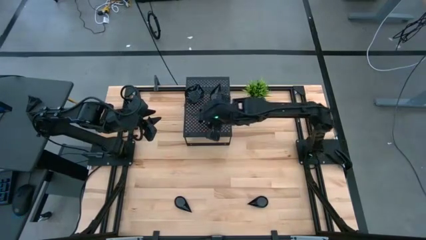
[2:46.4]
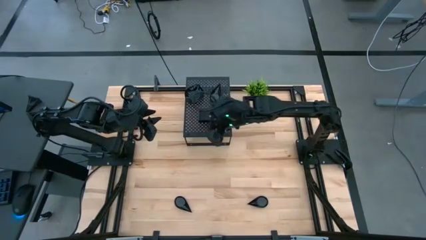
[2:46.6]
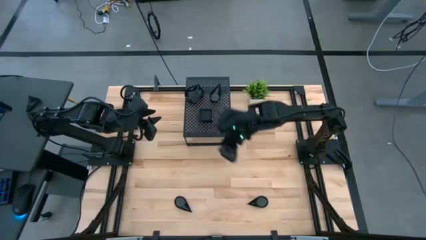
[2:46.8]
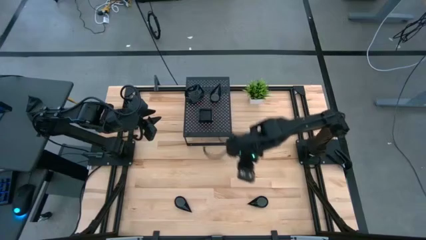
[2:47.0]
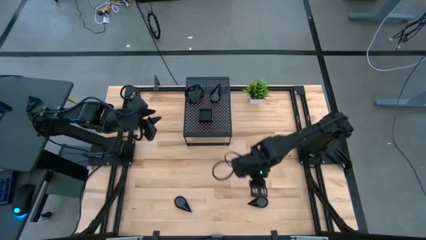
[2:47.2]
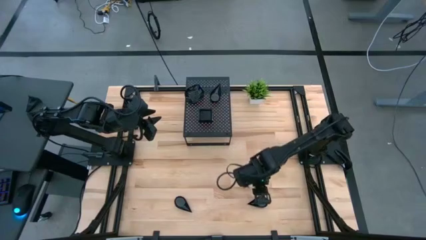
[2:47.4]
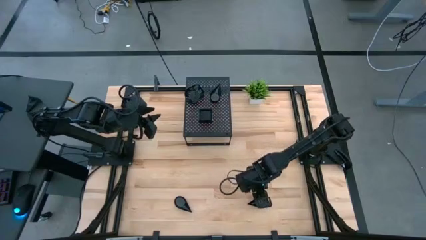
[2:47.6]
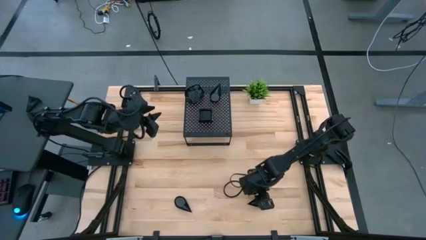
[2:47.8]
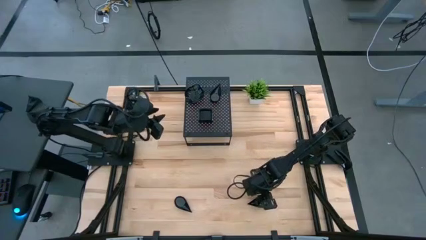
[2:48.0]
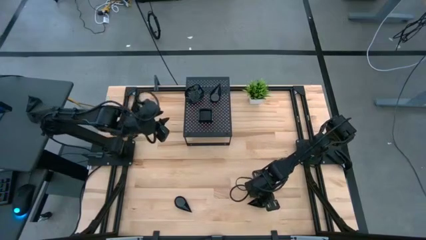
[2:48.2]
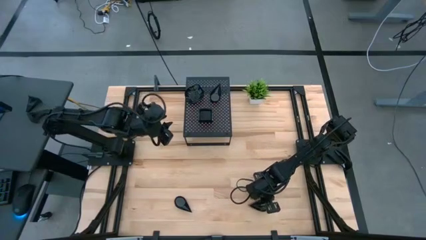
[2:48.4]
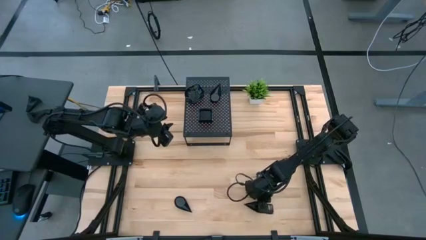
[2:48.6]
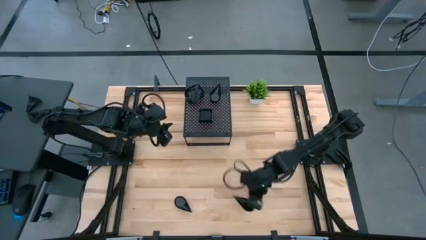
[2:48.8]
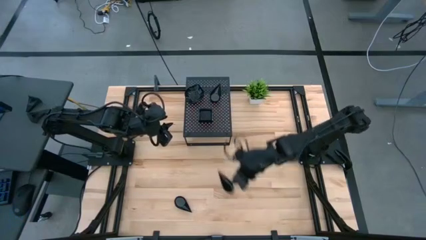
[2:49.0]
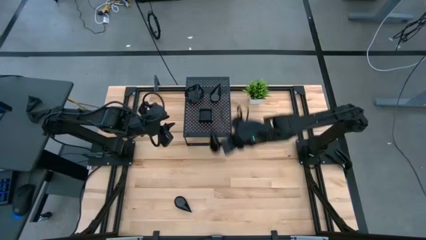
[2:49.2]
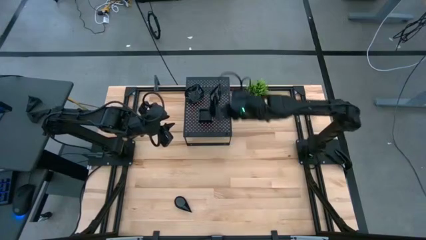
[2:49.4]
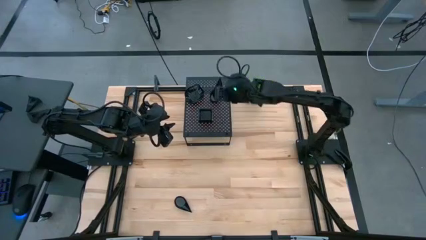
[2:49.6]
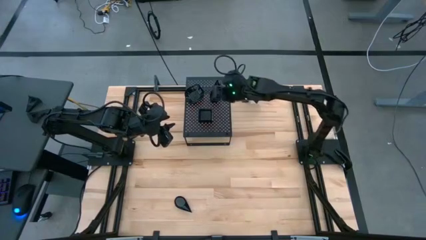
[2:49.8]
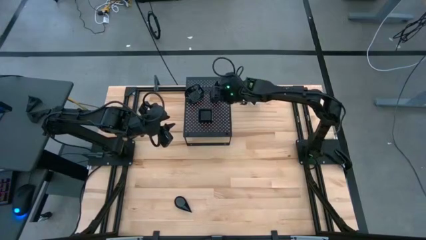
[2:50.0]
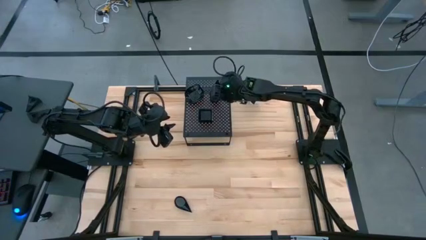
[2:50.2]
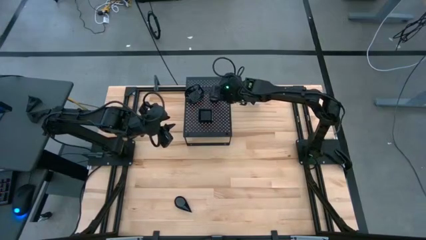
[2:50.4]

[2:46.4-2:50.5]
Task: Pick & Place Mini shaped plates
Stack the drop shaped plate on top of the drop shaped plates on the shelf

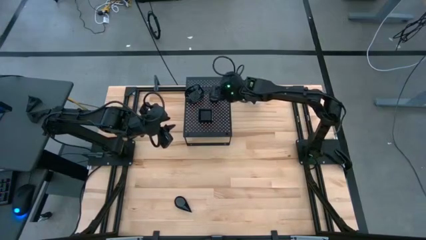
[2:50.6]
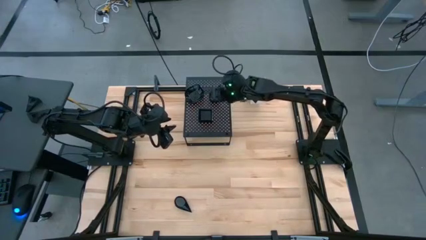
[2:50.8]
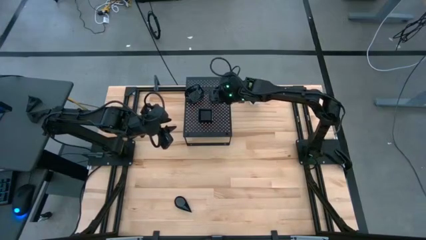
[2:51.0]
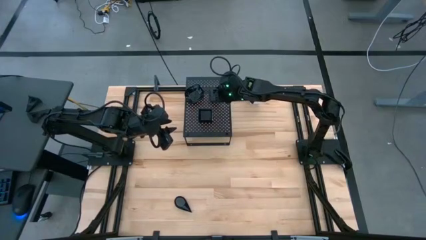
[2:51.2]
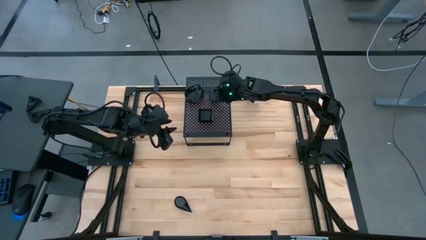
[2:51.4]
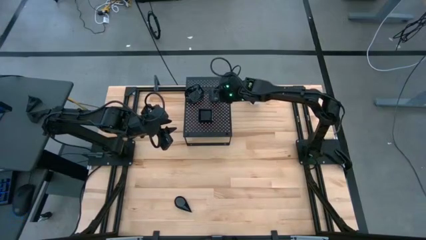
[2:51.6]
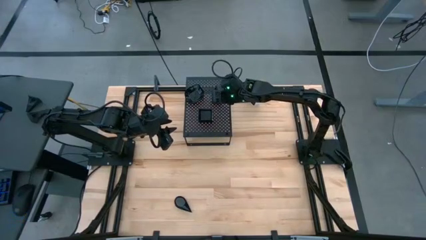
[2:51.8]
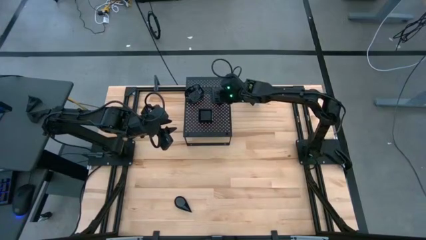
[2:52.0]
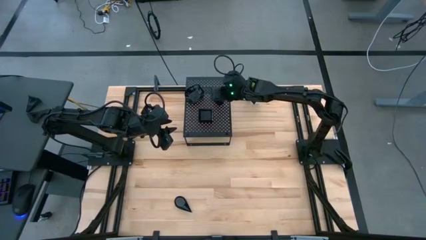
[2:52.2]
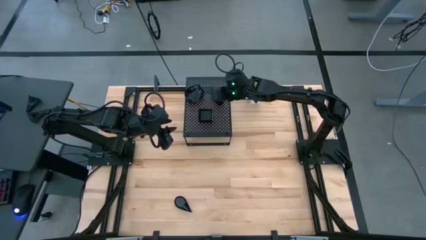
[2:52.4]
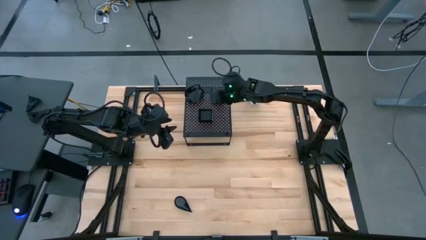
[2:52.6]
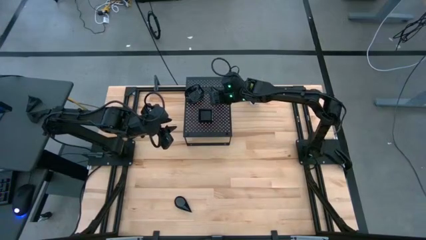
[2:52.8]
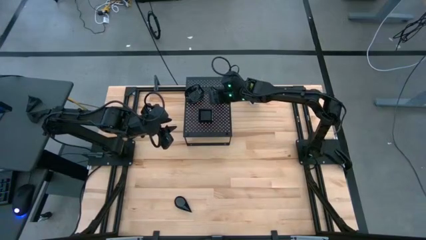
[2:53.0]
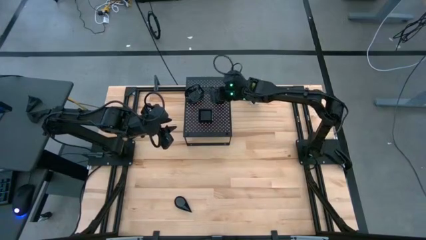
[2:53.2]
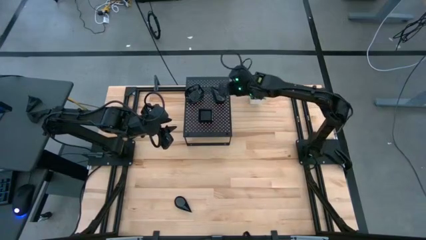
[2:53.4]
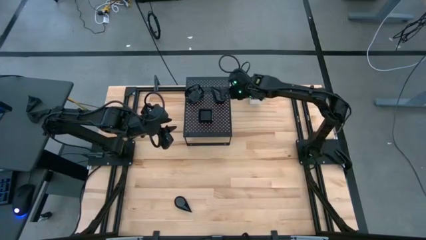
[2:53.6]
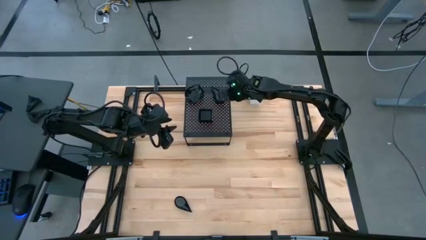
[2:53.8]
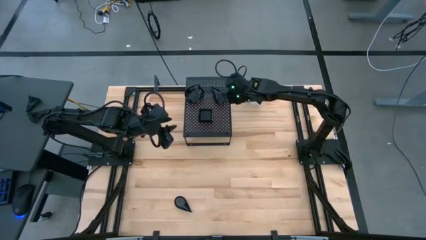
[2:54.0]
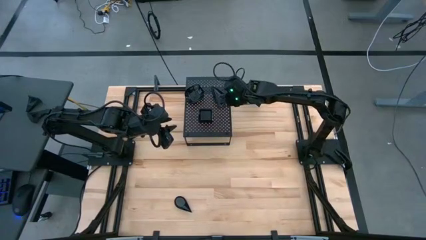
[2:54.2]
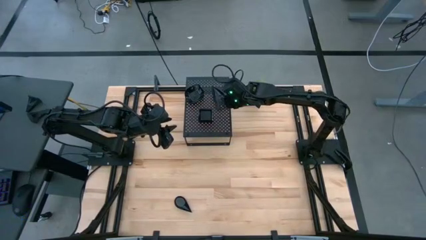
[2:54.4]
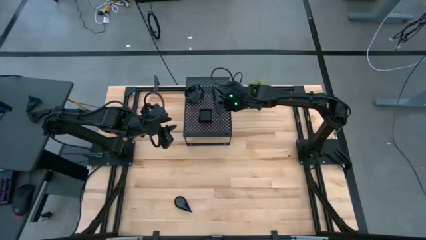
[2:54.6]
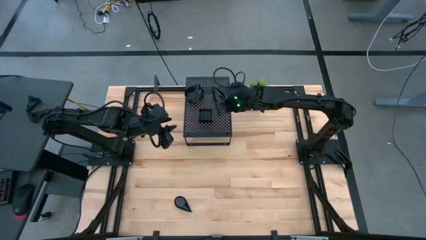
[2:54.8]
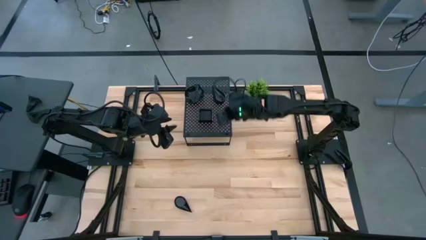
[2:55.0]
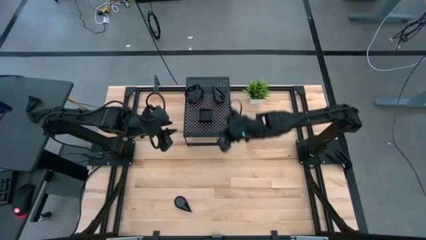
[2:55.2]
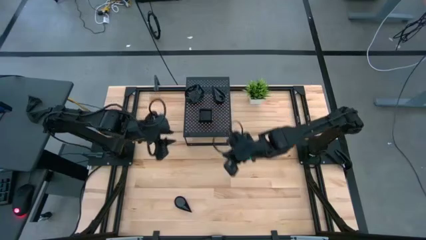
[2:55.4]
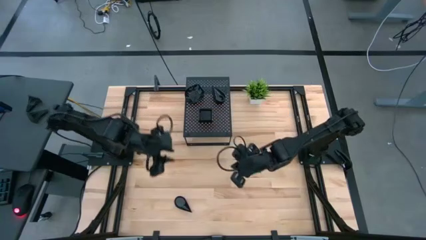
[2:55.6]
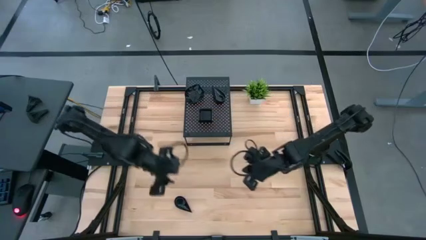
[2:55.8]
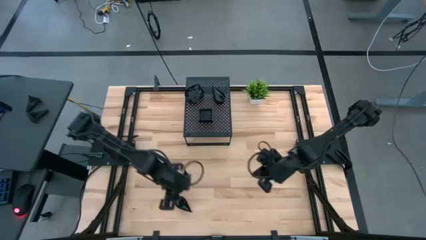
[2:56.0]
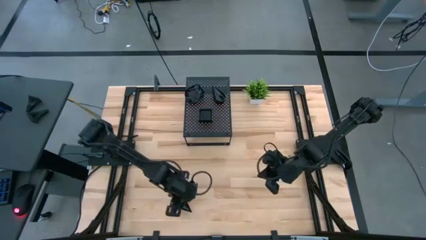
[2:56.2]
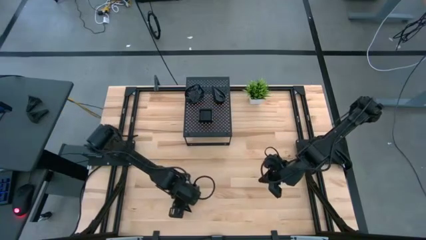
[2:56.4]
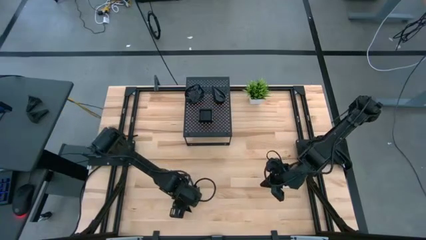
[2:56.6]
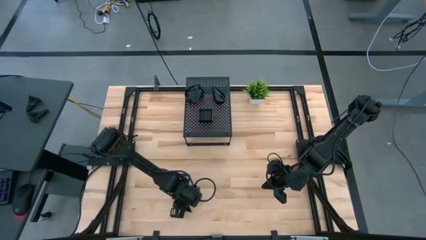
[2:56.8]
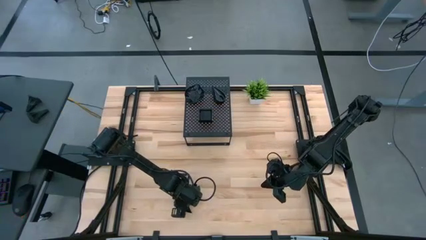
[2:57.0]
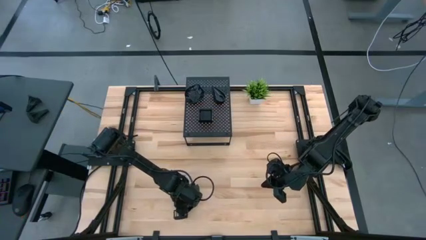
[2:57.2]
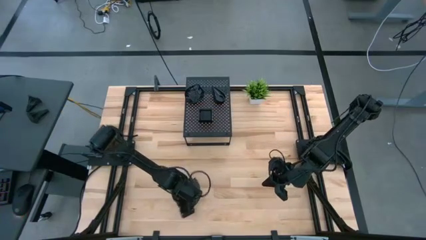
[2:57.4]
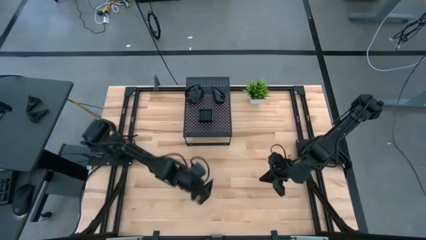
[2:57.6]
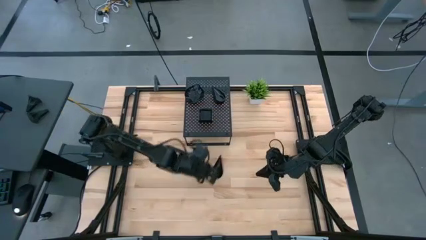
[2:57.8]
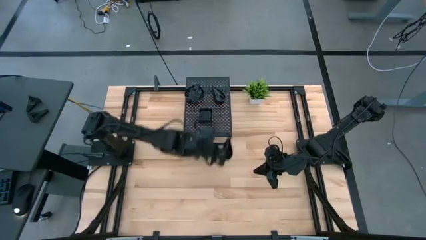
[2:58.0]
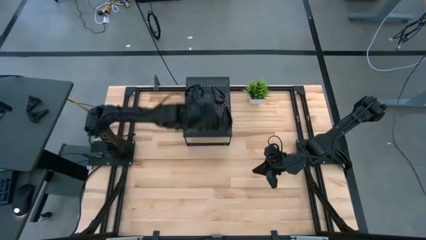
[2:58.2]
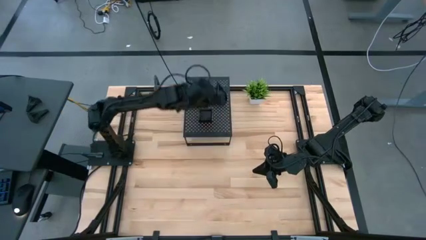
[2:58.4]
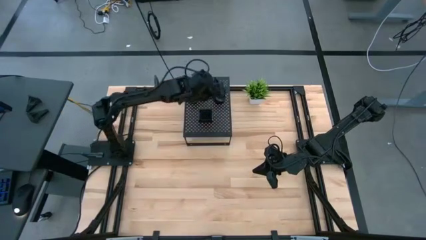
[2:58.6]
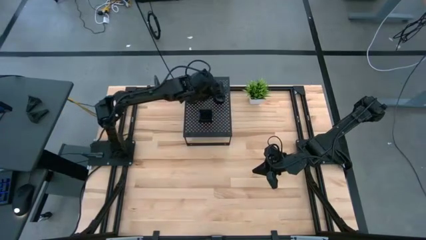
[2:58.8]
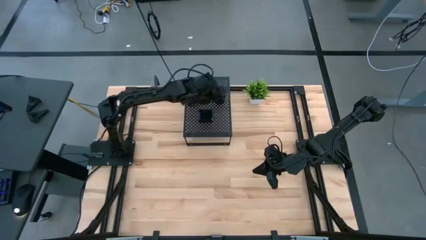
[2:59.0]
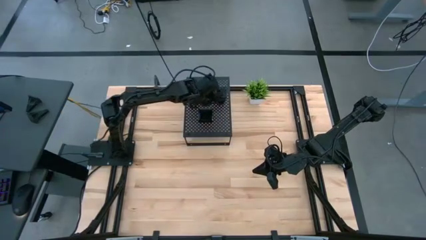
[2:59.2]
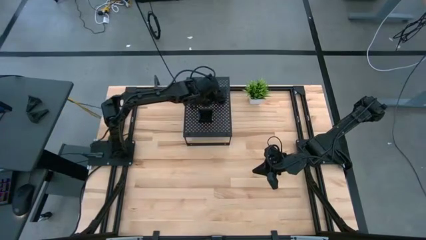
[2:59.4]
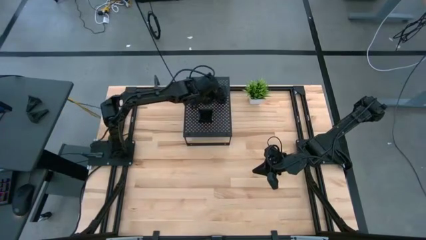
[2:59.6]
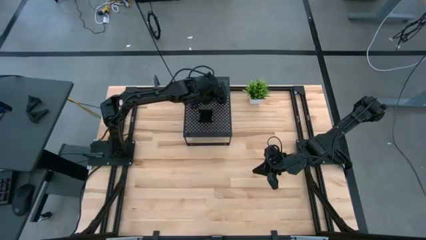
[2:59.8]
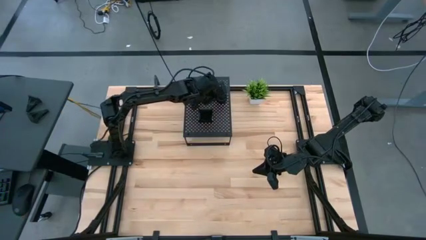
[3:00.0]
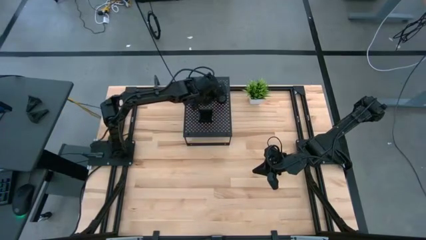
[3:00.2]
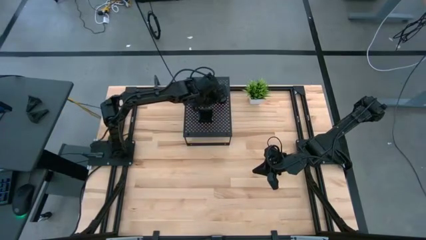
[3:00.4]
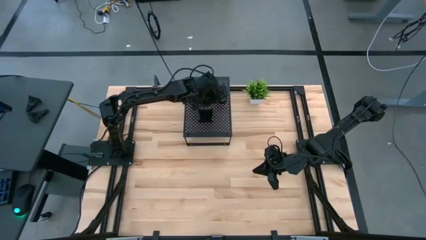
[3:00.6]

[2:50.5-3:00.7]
Stack the drop shaped plate on top of the drop shaped plates on the shelf

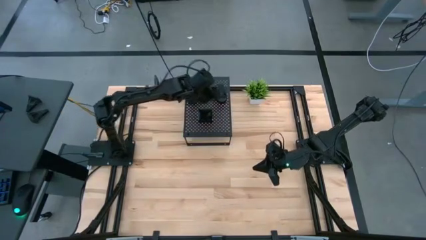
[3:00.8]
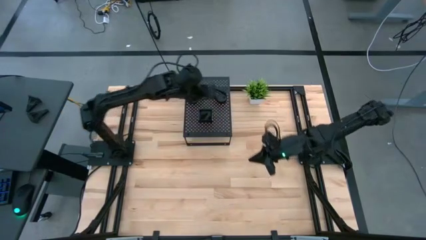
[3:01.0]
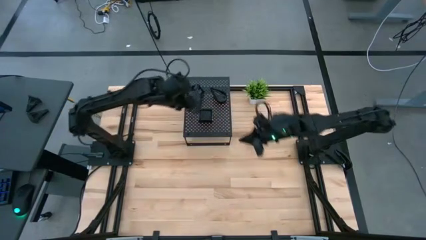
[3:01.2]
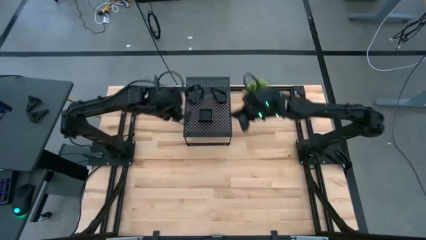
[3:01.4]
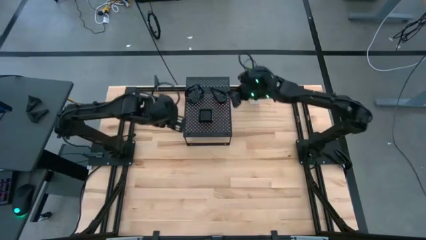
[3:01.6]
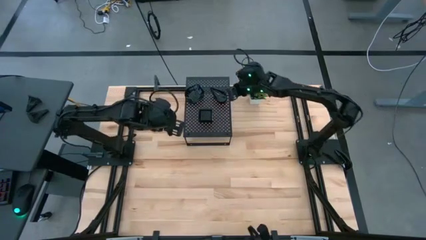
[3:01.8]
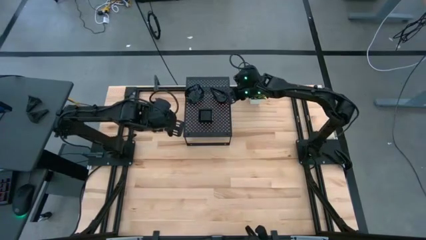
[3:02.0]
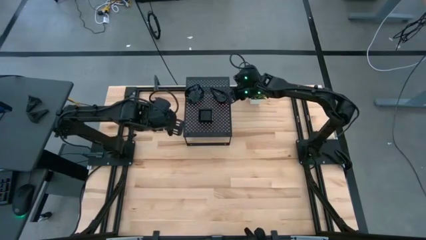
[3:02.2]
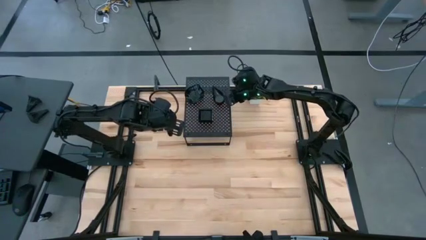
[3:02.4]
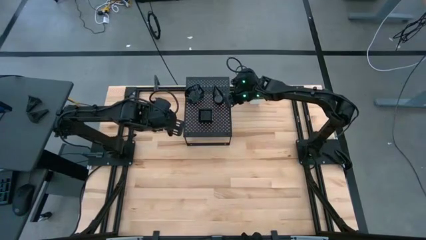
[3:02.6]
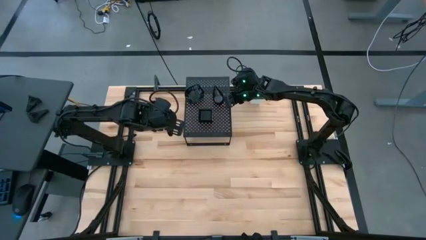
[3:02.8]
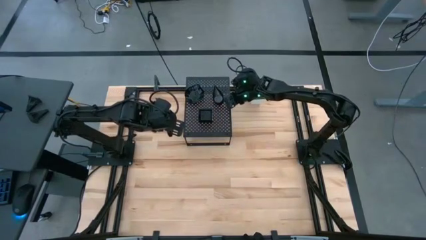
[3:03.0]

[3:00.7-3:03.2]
Adjust the drop shaped plate on the shelf
